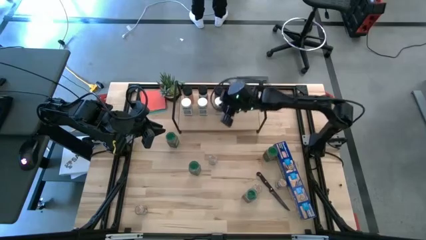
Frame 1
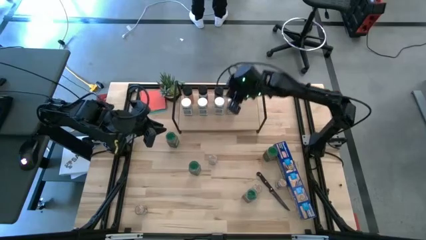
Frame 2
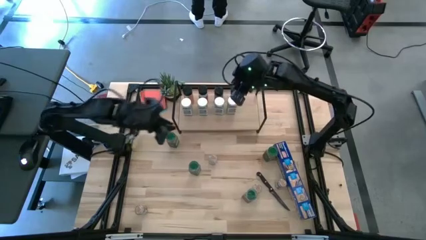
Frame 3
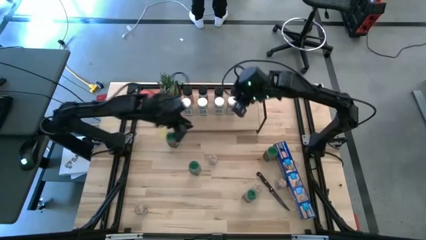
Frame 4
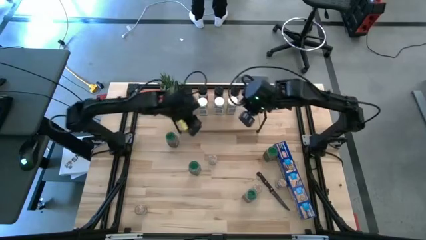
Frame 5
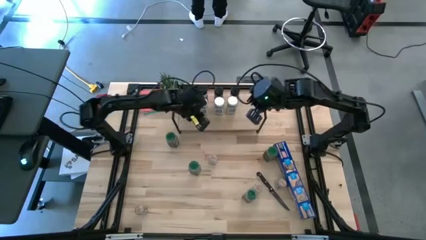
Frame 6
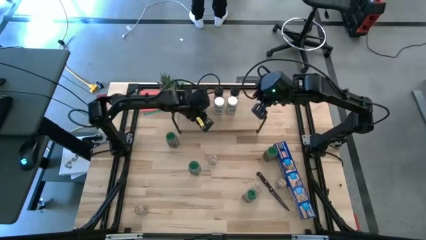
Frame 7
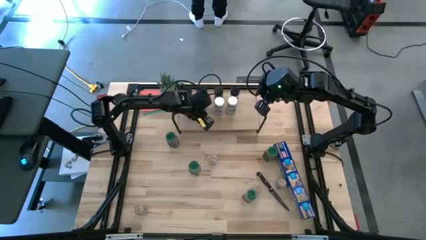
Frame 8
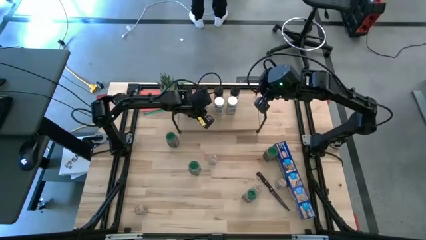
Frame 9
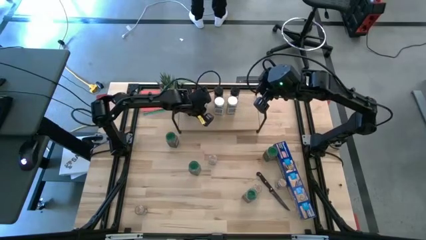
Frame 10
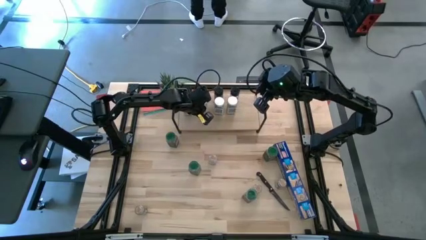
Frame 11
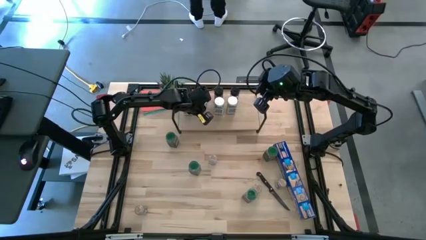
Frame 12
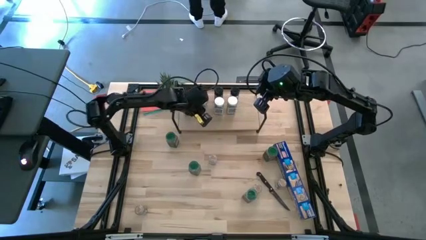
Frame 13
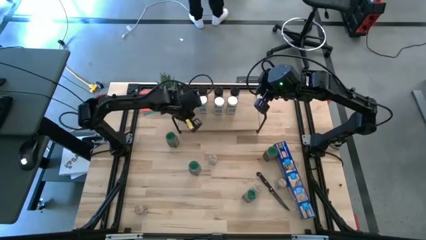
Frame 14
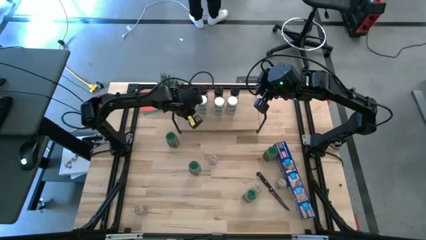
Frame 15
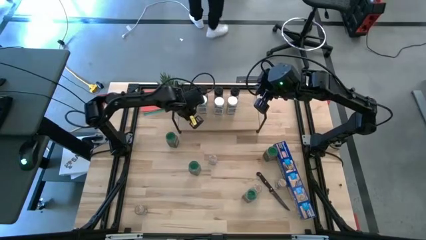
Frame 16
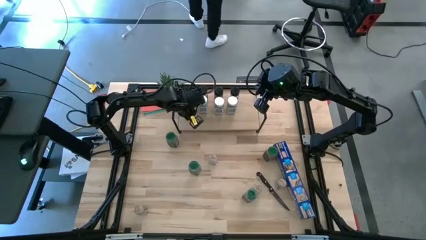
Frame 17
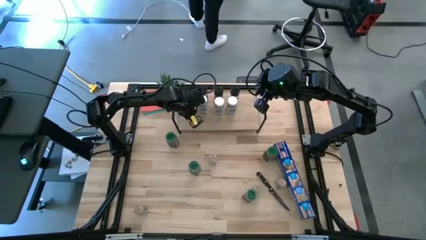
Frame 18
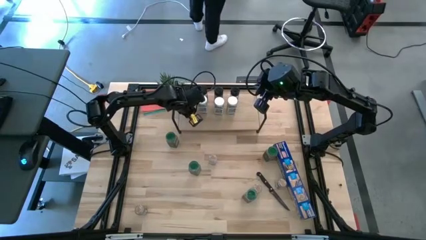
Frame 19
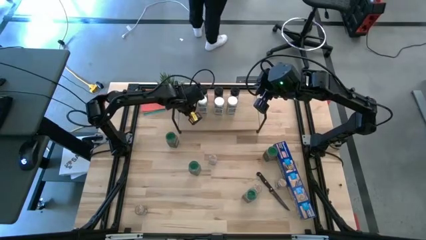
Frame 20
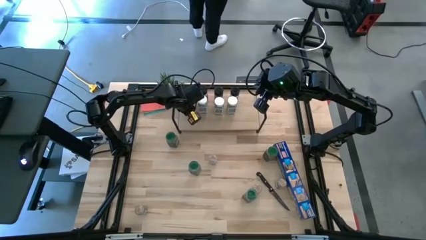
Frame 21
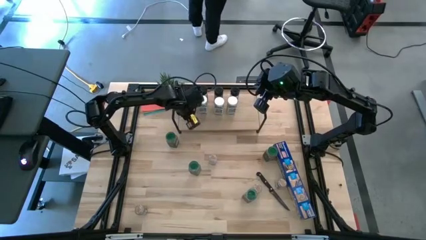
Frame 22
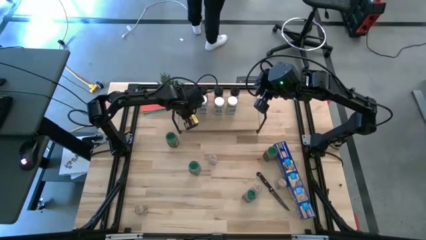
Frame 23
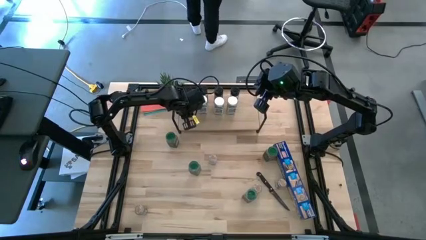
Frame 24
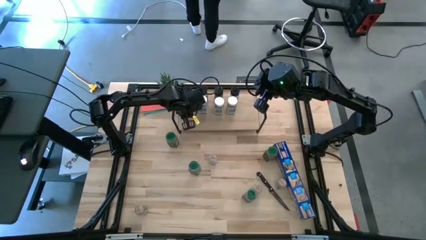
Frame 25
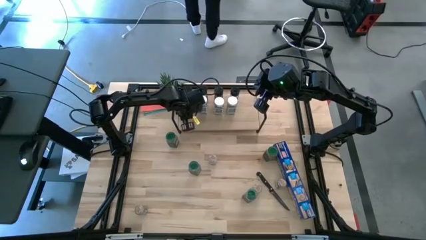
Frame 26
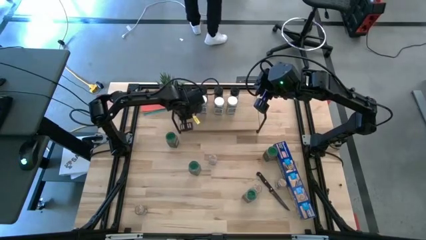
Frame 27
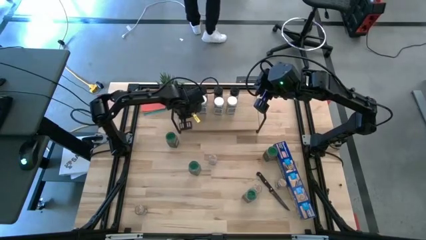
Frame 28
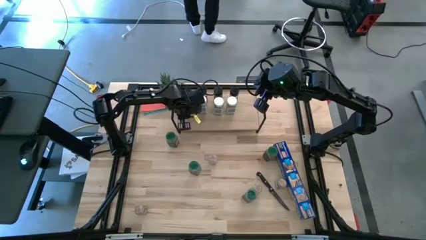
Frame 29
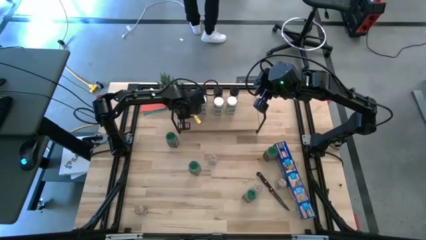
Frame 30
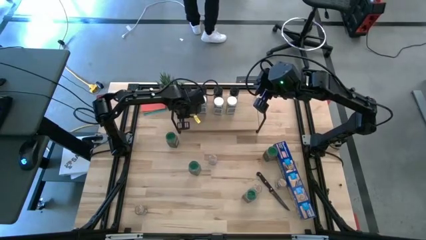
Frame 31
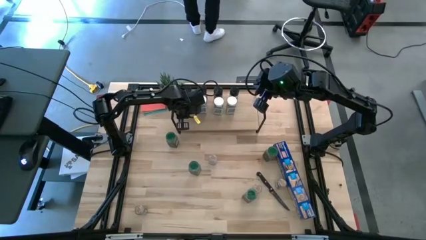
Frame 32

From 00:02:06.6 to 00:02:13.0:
Task: Shelf spices
Adjust the white seasoning bottle

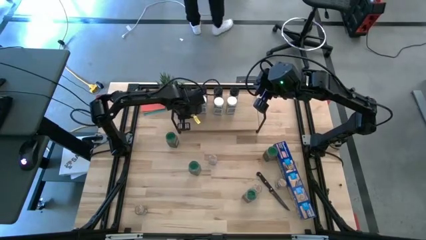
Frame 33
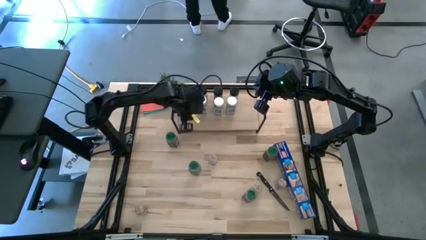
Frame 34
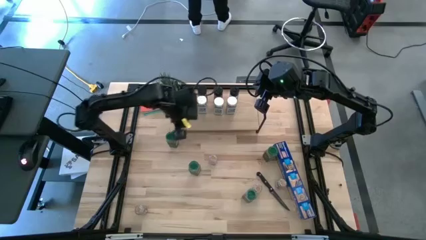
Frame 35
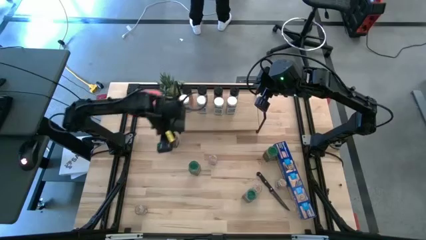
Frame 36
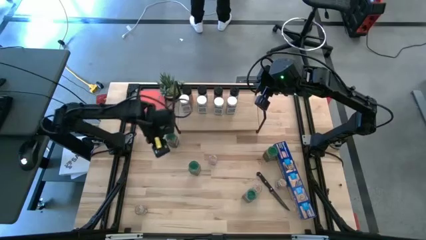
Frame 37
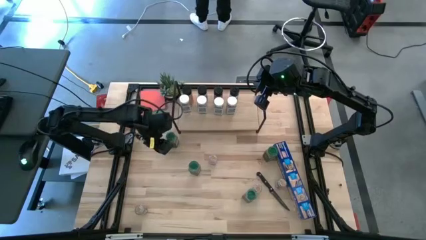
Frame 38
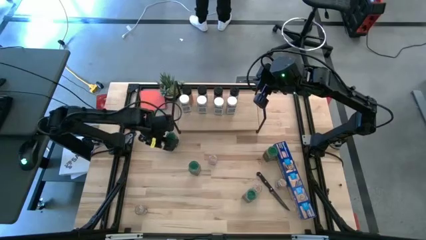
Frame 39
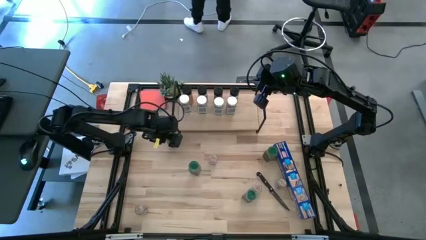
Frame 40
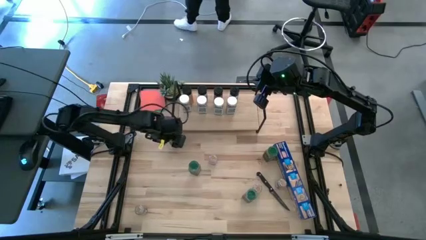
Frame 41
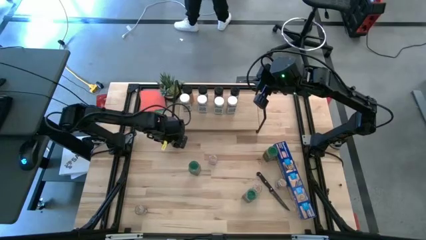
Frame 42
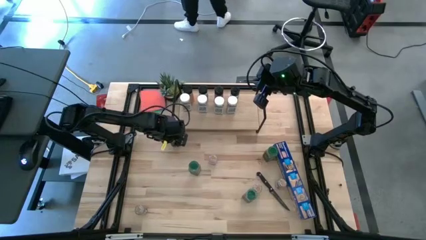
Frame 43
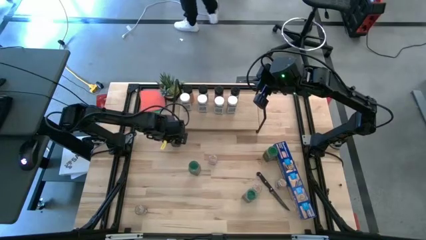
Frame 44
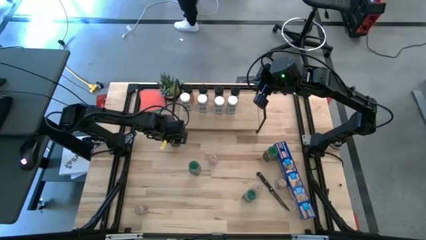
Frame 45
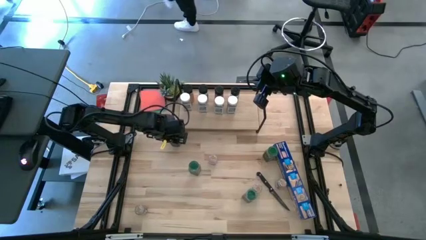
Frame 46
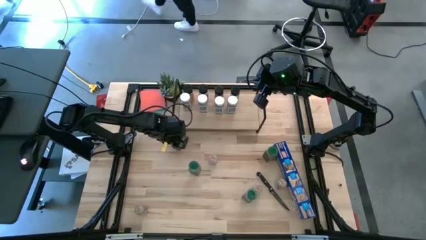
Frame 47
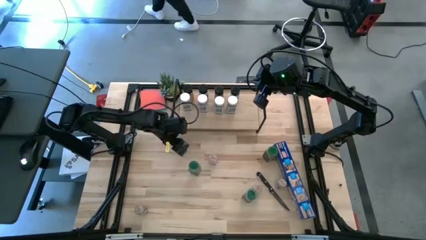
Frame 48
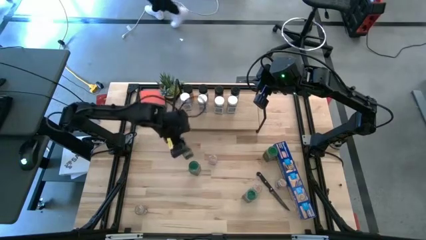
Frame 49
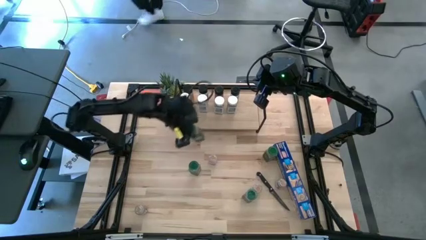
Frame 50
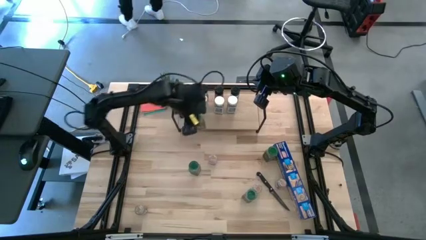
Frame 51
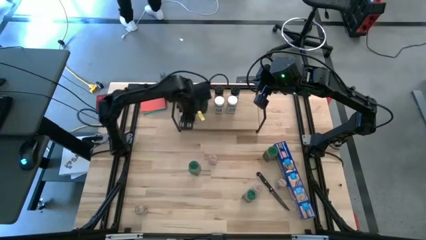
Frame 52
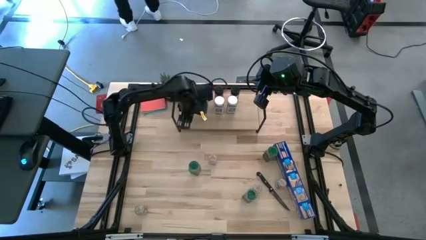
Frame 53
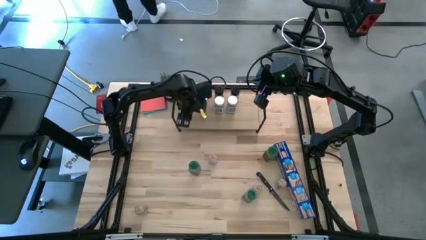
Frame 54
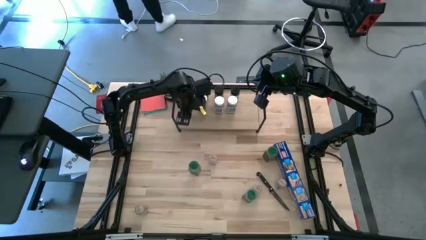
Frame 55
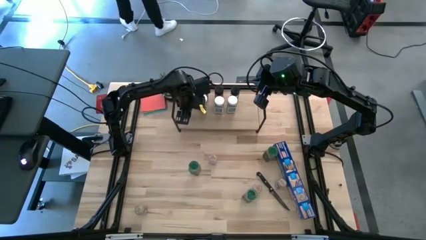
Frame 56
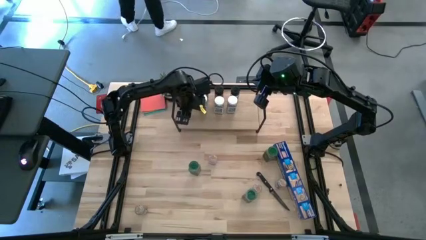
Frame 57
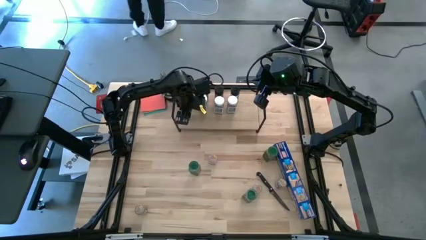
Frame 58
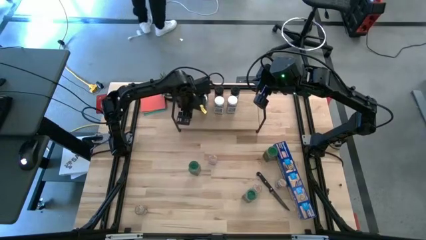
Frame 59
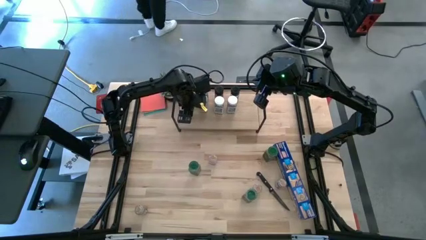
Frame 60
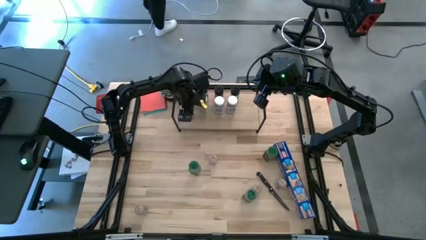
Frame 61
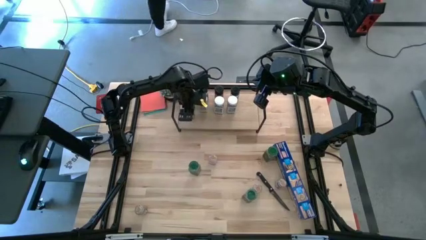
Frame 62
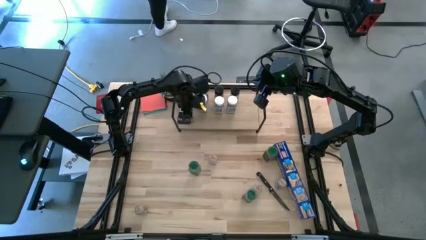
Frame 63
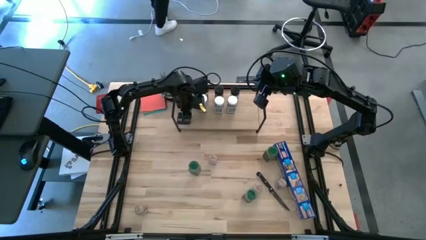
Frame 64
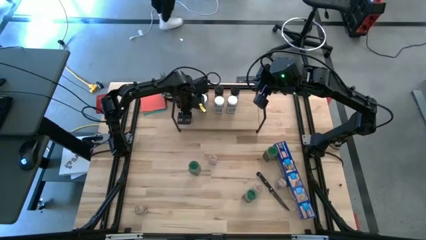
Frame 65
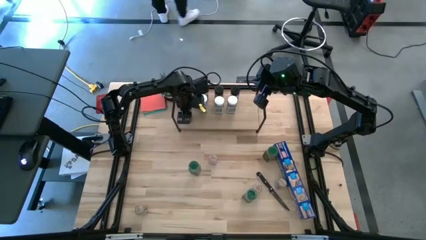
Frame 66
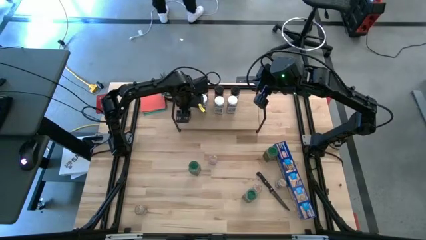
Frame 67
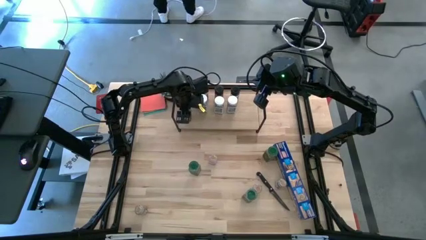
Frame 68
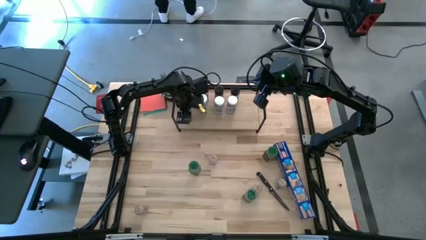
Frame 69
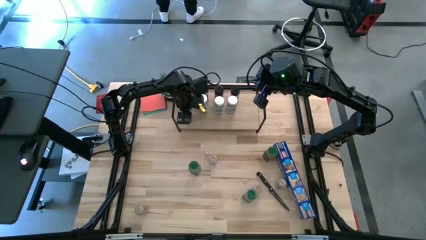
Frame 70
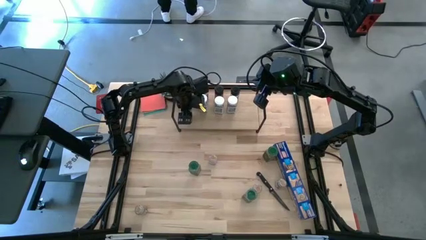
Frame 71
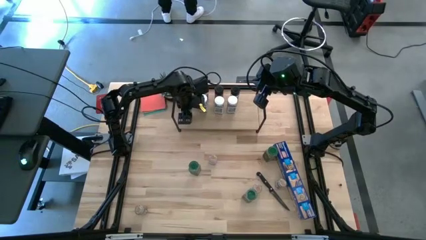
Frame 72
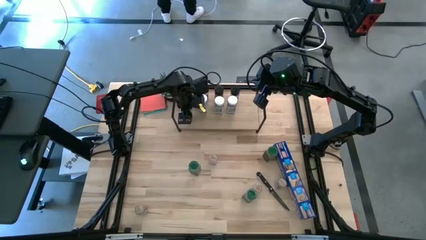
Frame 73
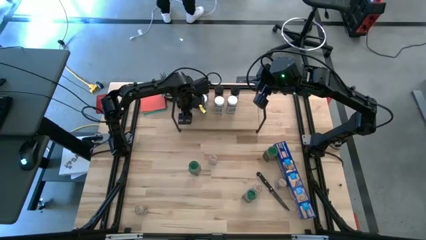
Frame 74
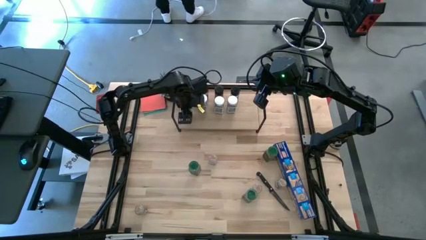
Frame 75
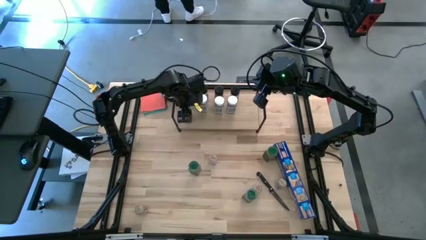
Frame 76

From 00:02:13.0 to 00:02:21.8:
Put the green seasoning bottle on the shelf aligned with the white seasoning bottle

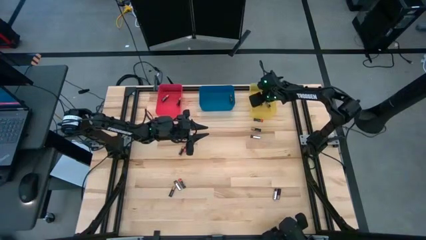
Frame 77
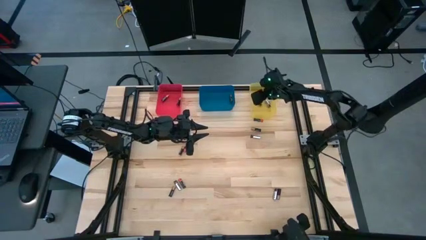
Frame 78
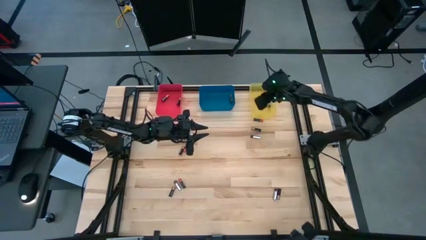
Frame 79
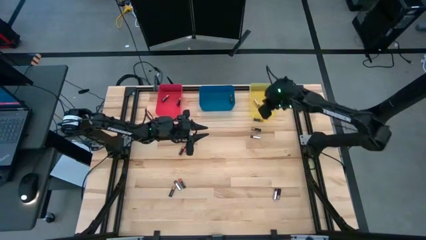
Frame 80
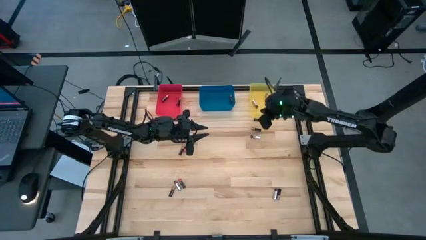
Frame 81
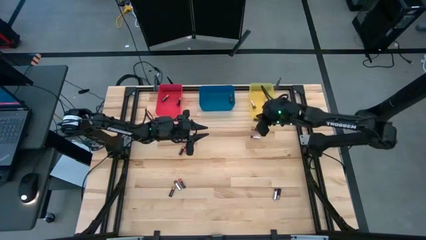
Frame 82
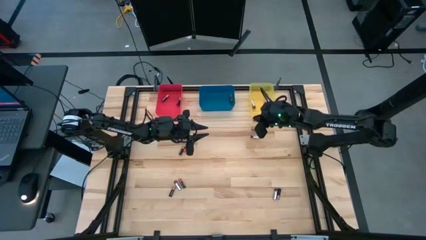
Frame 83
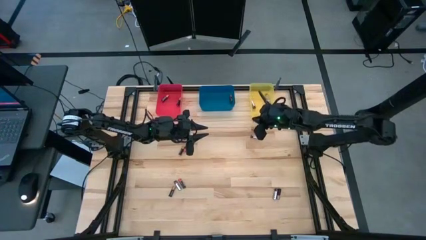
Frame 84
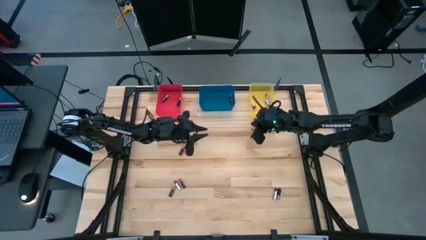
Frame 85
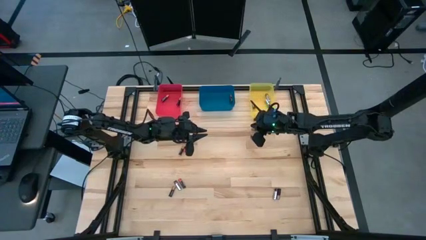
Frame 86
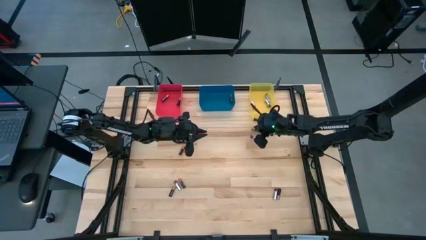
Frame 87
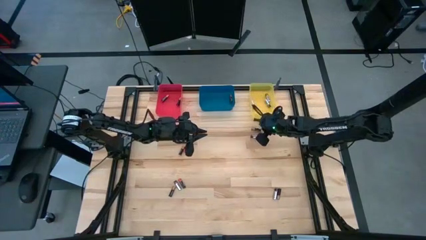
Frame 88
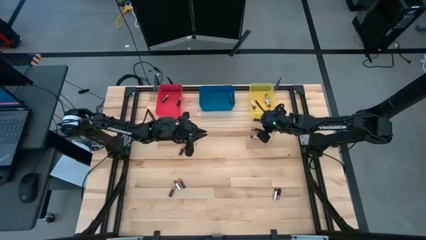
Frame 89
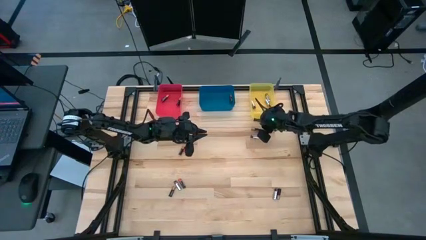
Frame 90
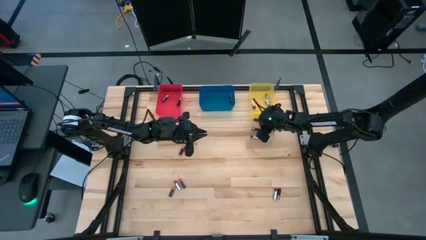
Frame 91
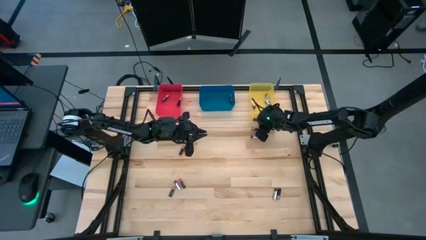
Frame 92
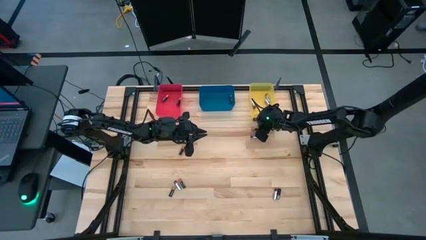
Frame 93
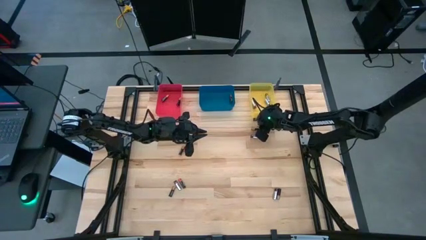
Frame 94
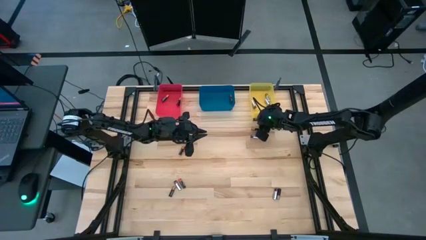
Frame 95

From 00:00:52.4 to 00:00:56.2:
Task: Sort batteries
Put the orange battery into the blue bin
